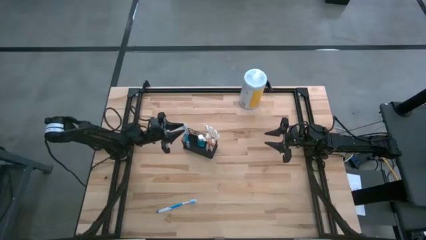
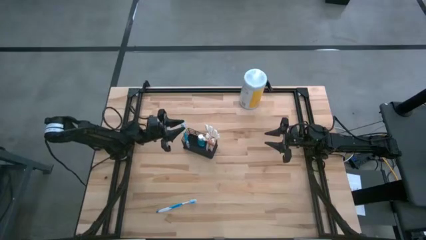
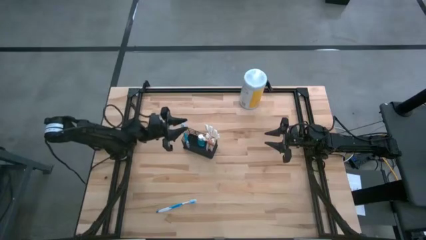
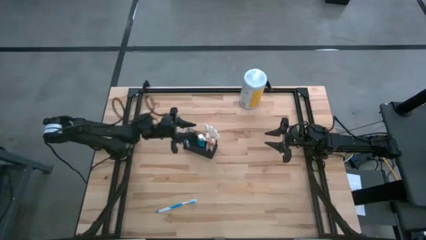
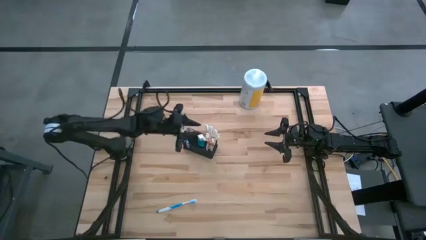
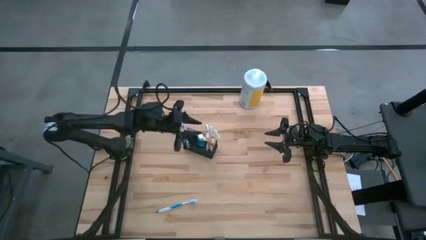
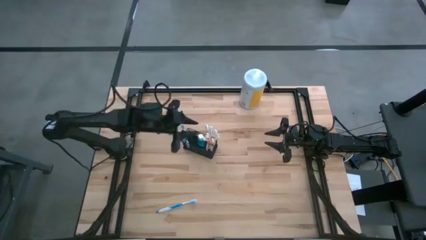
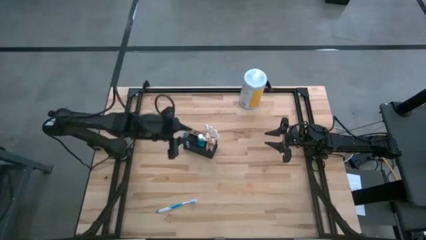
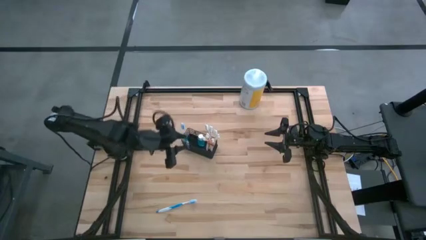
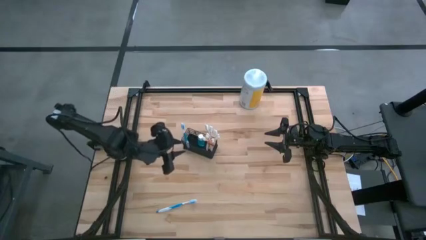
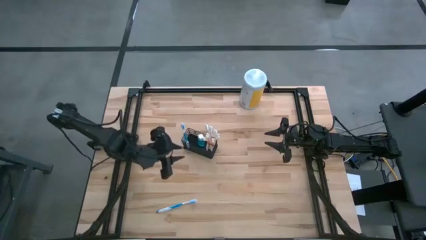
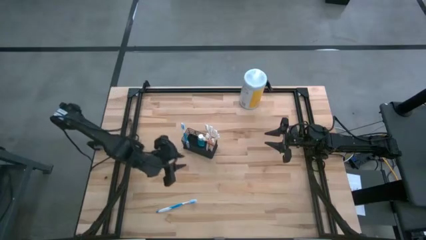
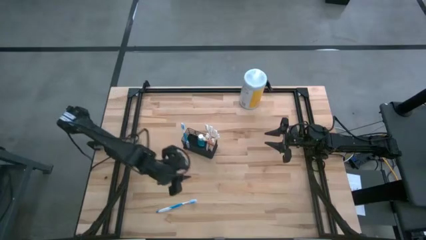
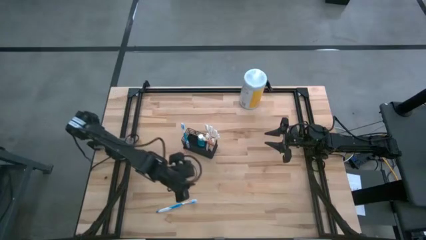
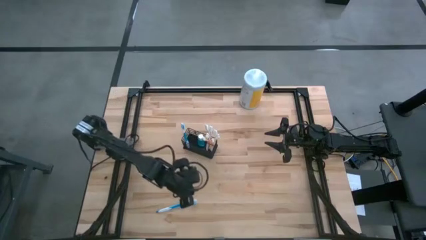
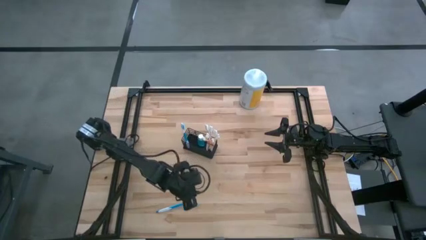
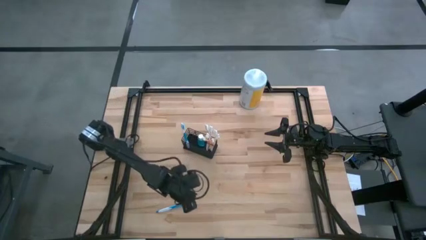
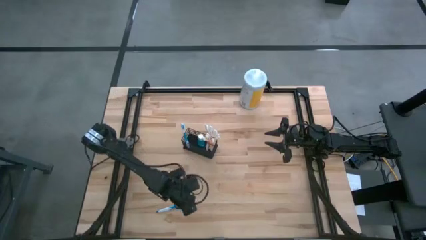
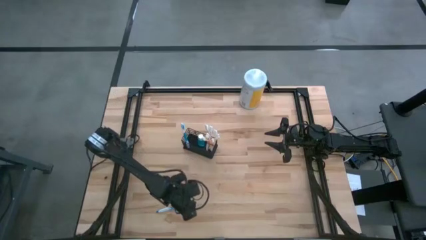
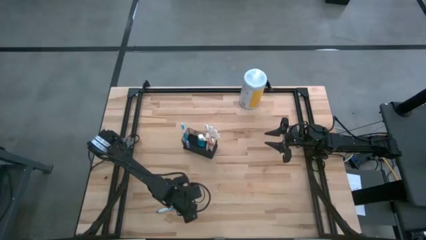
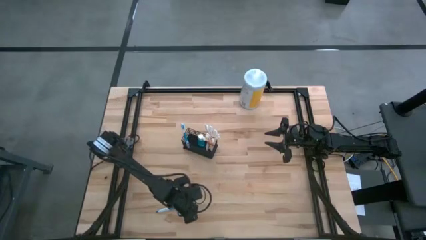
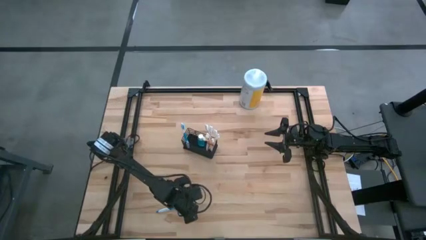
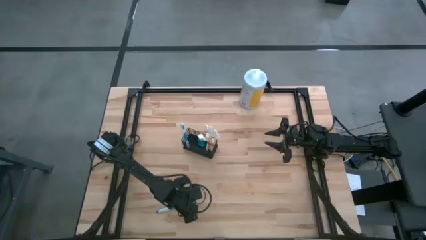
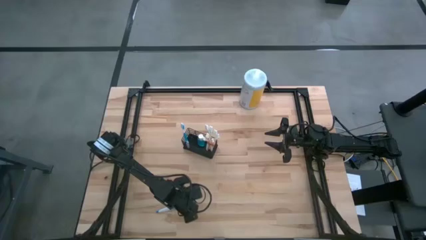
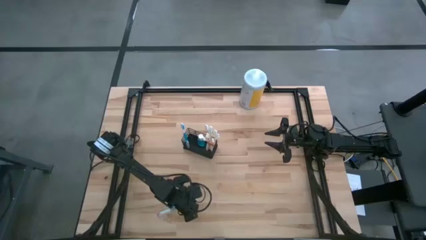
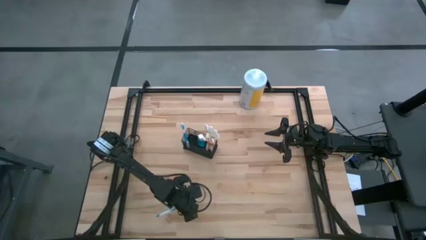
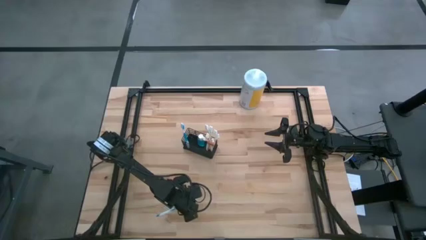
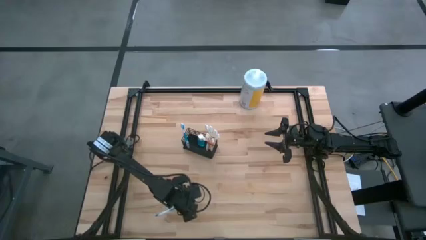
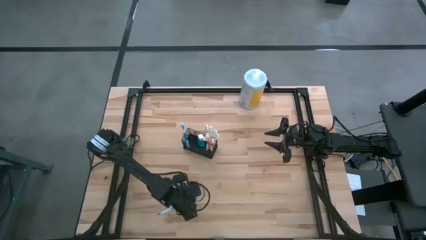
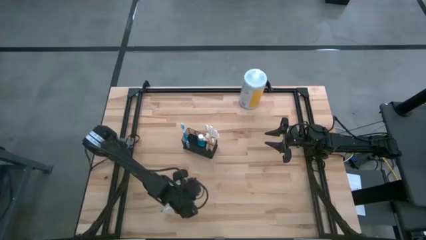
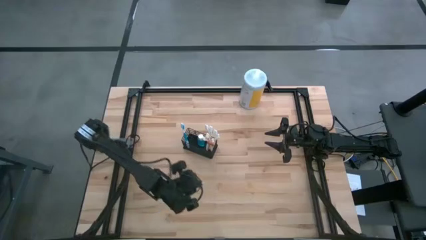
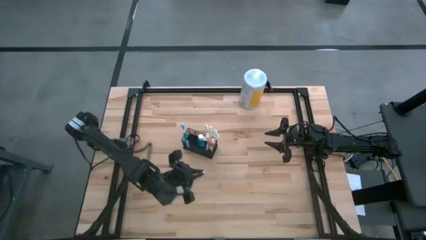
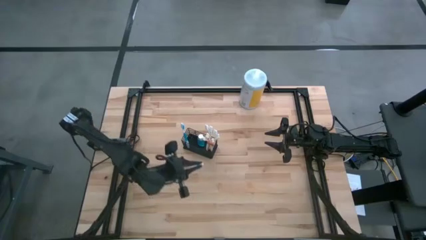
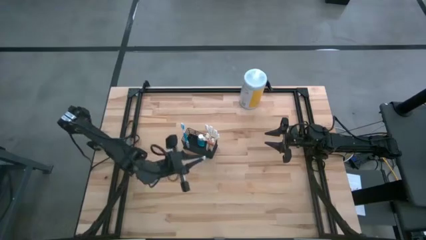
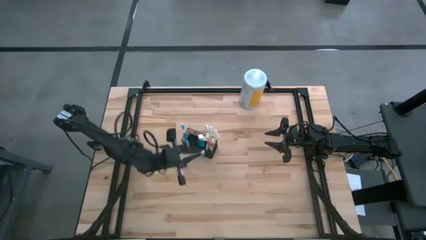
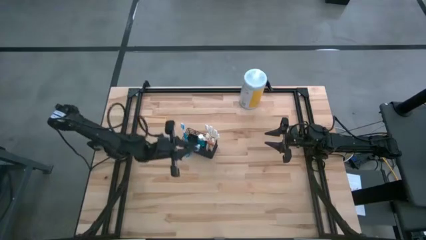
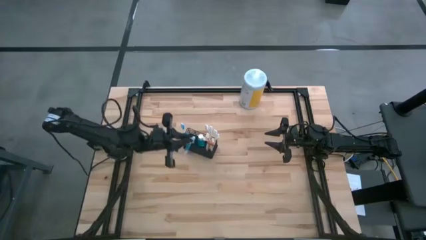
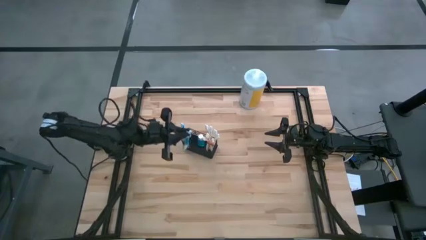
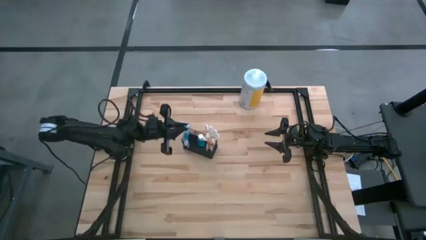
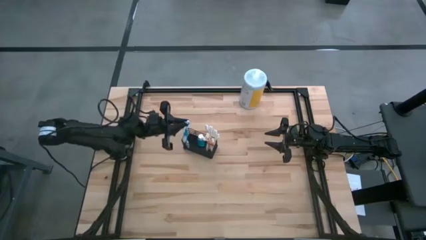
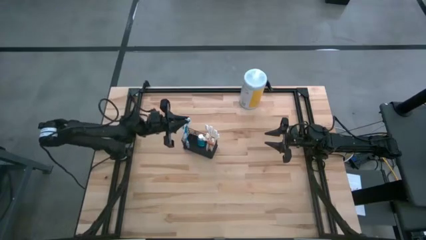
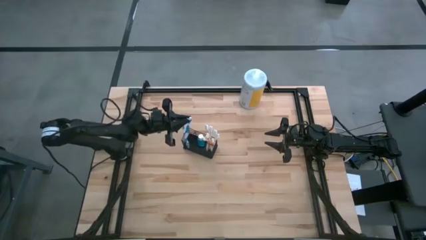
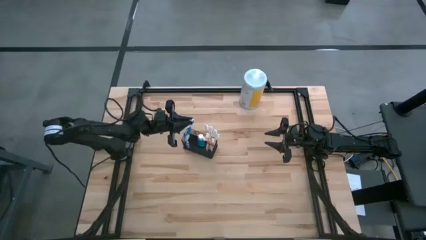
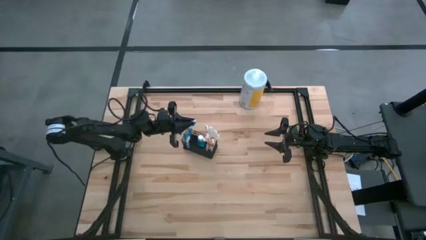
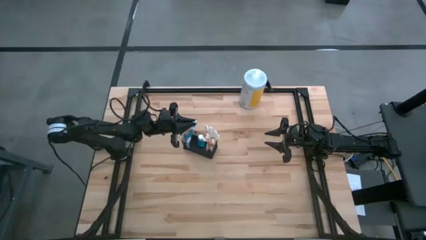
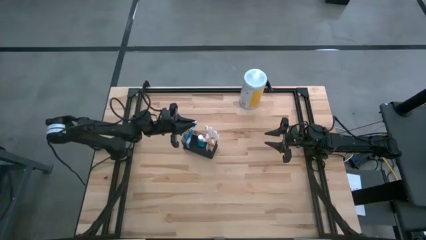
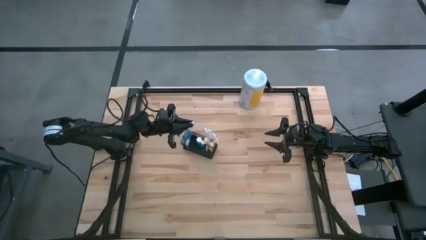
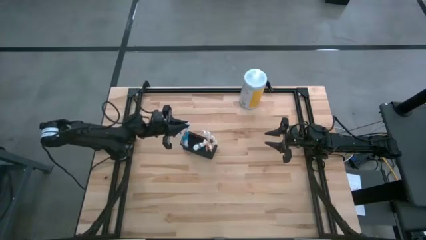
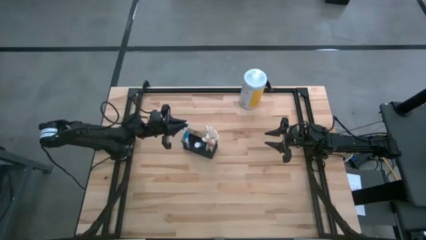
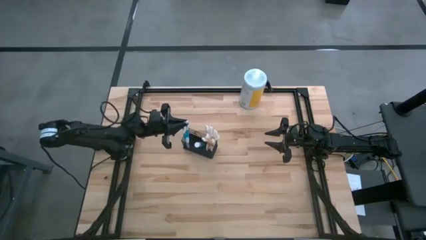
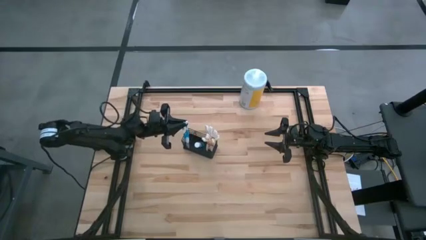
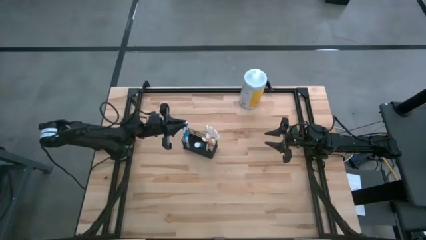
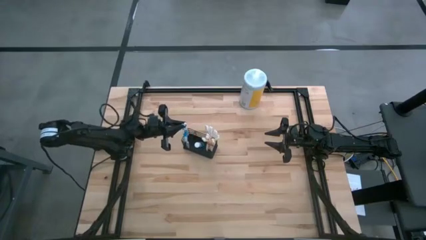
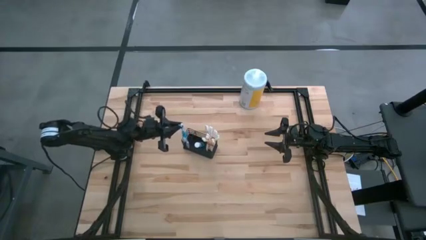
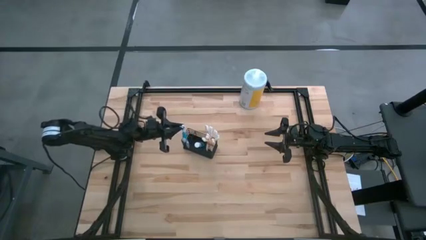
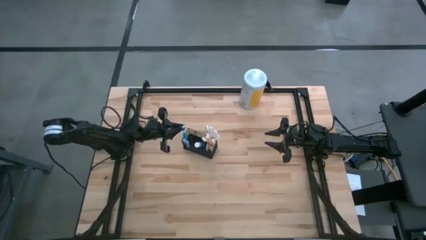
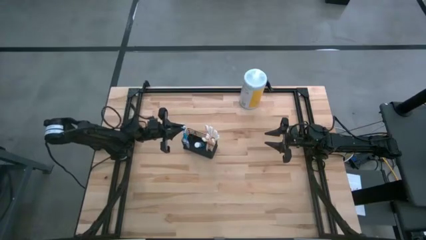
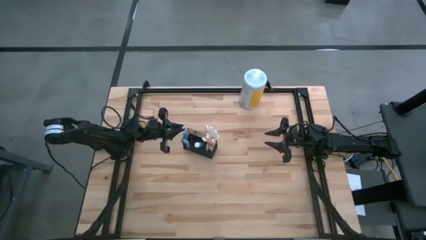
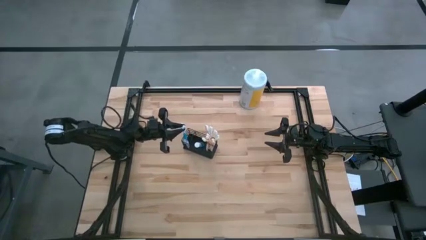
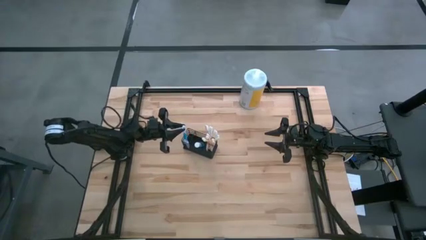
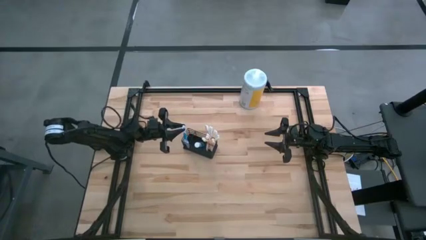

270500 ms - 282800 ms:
Task: Pick & Place toothbrushing station
Put the blue toothbrush into the left section of the wire organizer

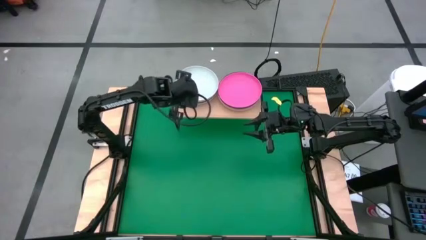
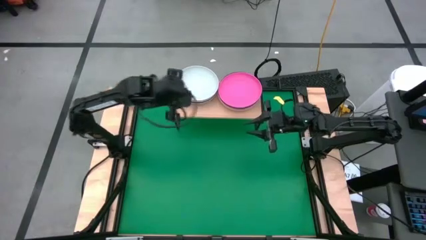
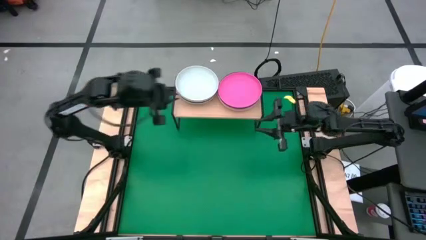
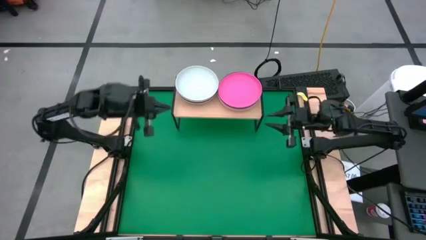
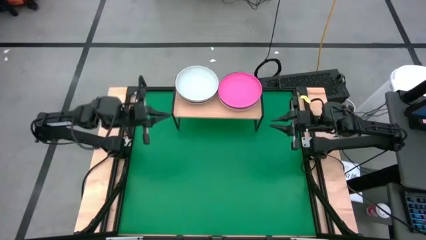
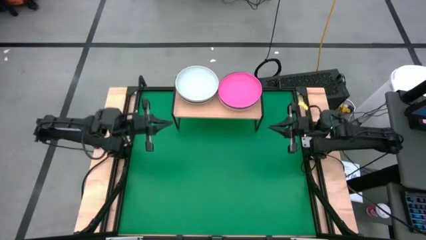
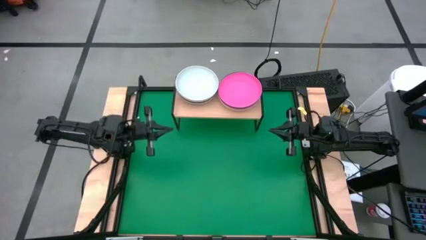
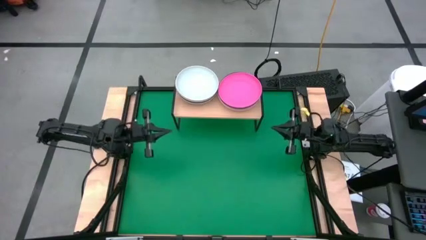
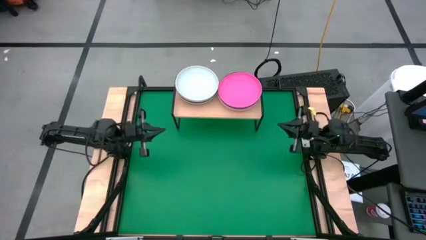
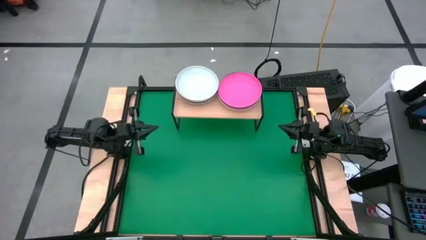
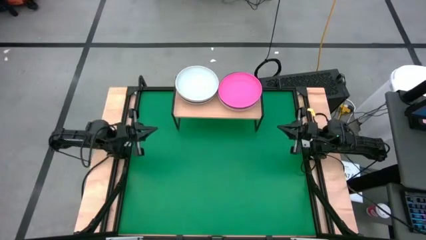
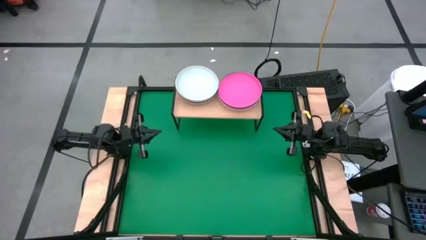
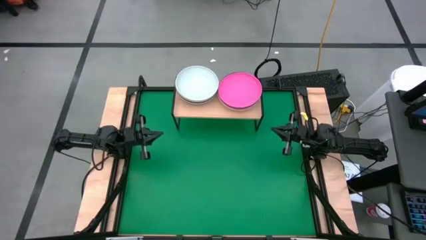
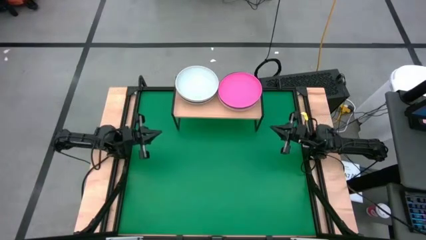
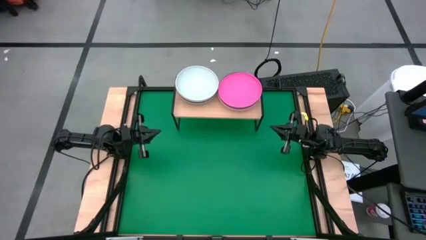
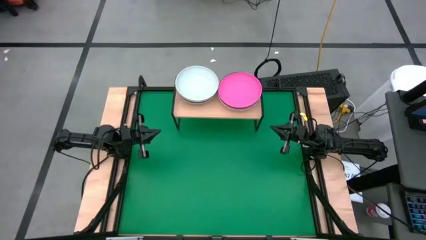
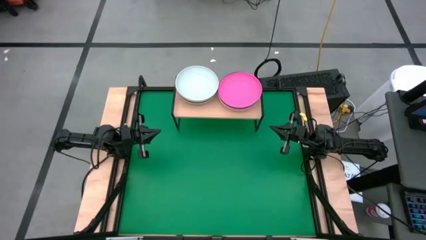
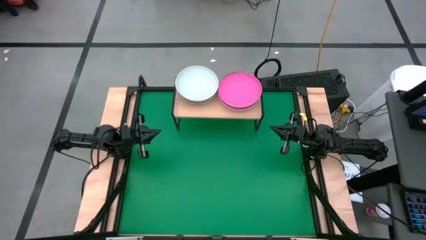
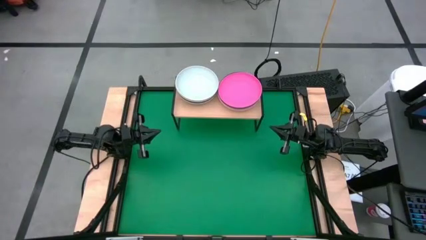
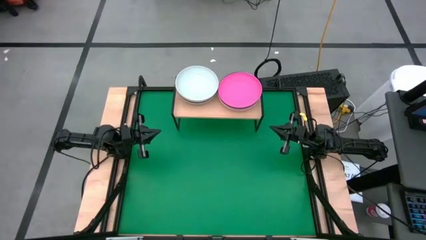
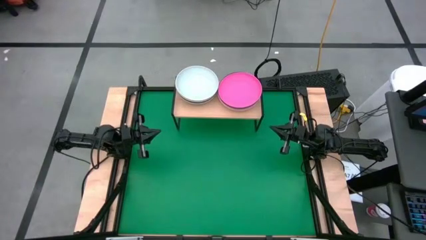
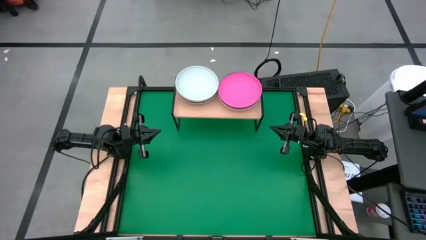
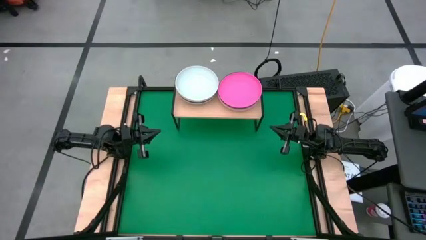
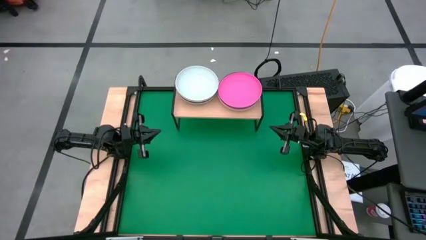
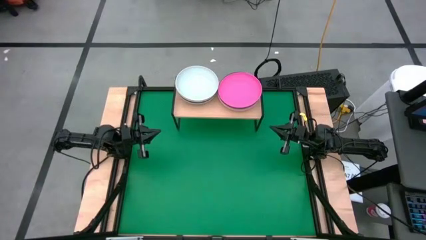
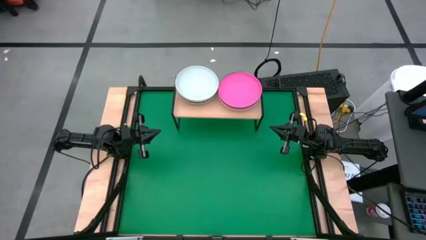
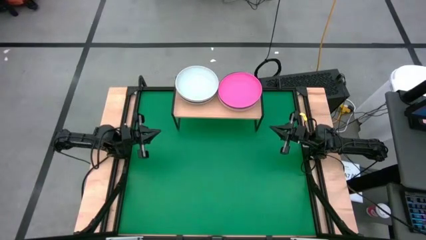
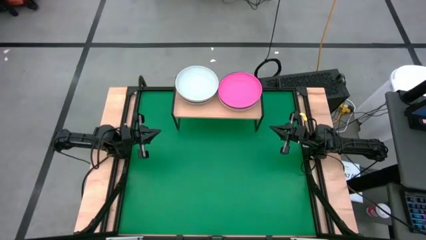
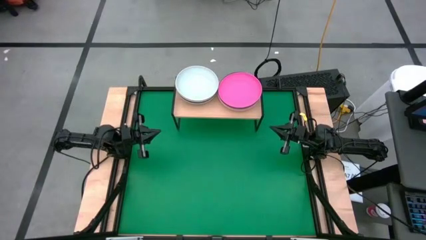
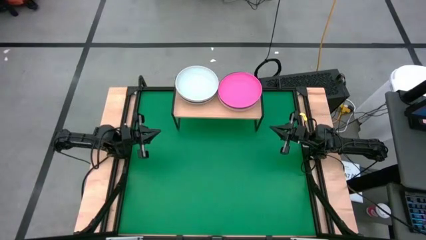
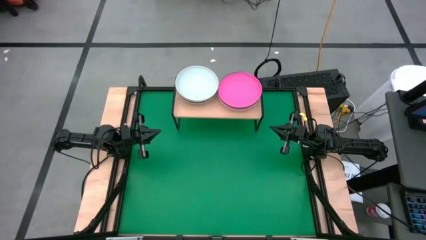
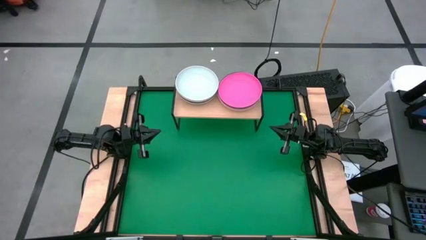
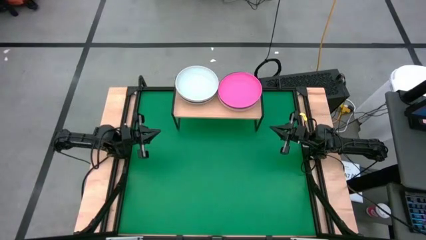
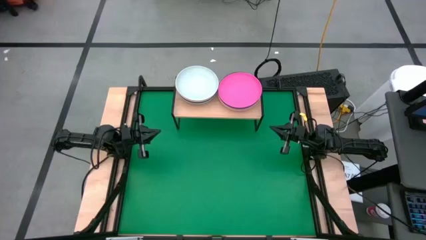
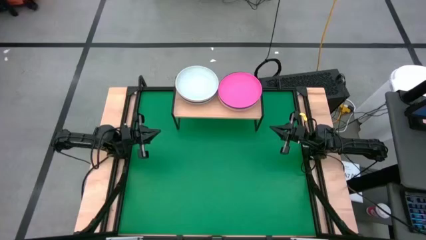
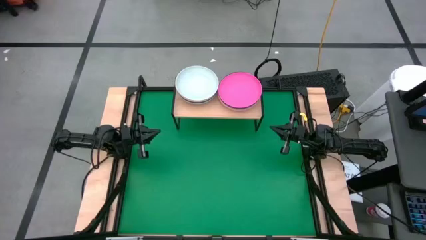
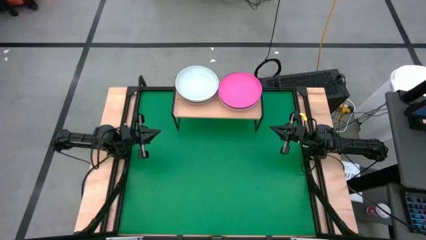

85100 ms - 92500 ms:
Task: Place and stack plates onto a shelf
Return to Home Position
